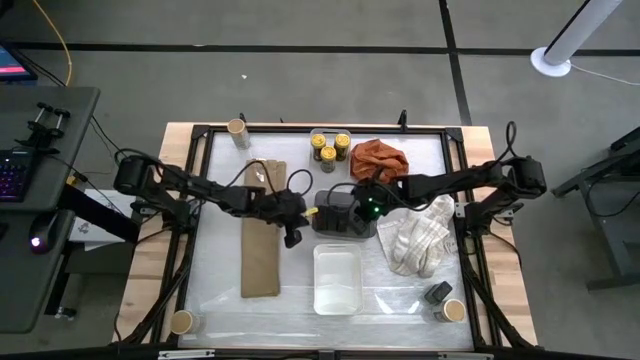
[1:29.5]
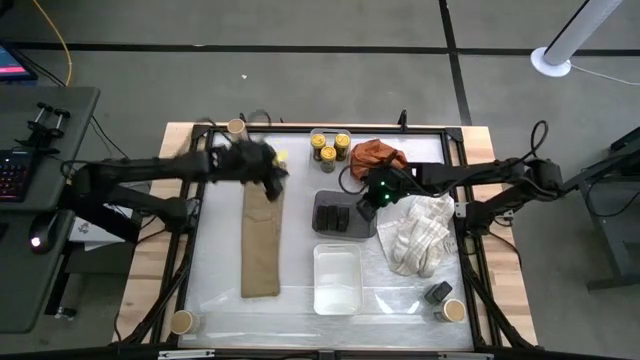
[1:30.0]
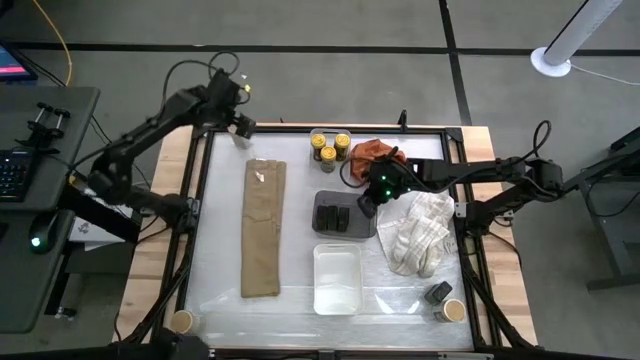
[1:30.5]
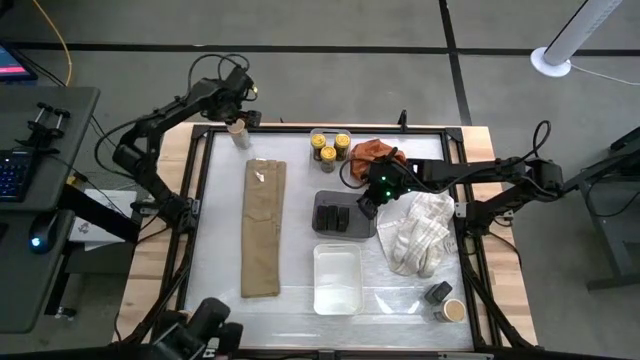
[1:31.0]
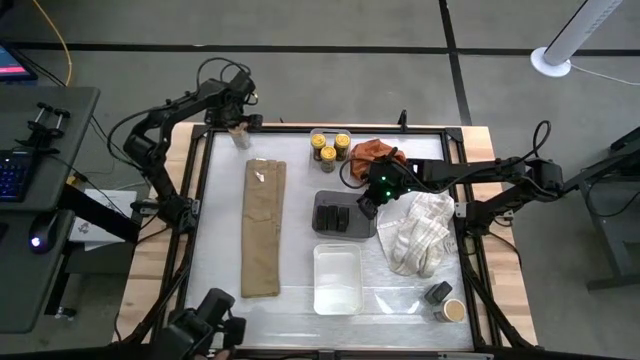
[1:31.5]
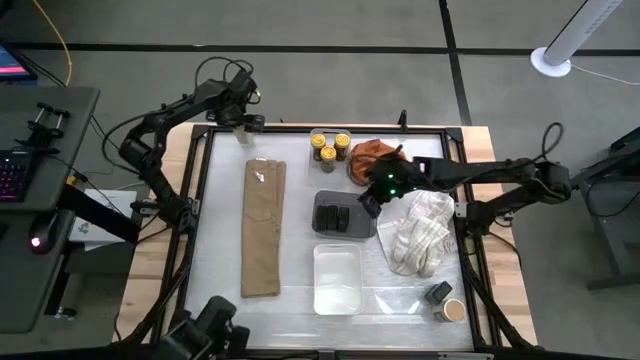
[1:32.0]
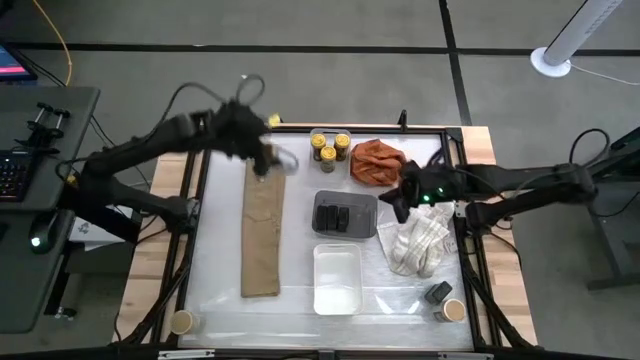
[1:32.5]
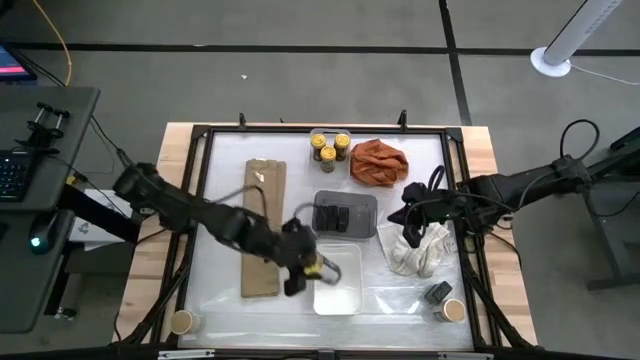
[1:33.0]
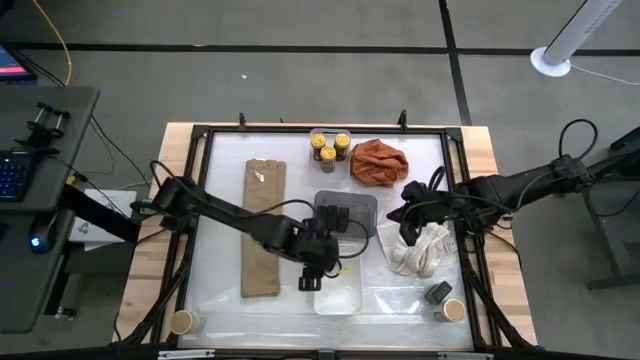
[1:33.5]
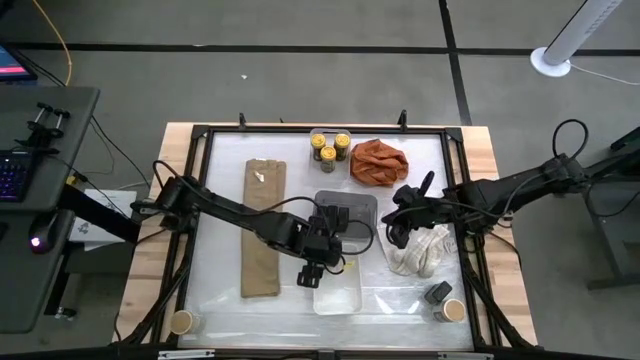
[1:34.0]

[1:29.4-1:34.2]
Task: Sort spices by type
Put the top left gold seasoning bottle into the white bin

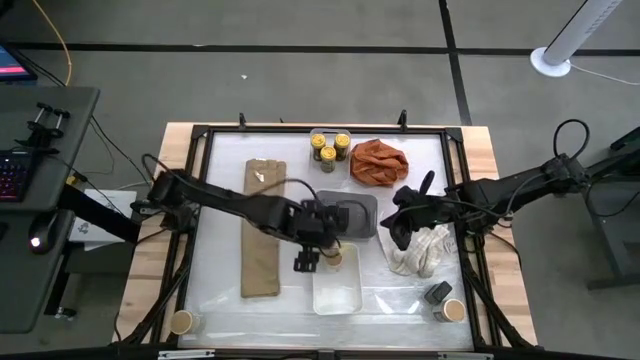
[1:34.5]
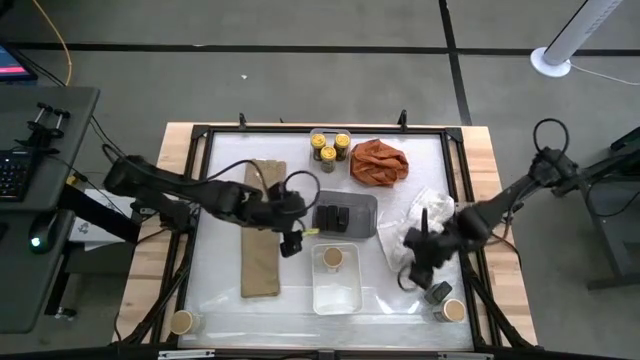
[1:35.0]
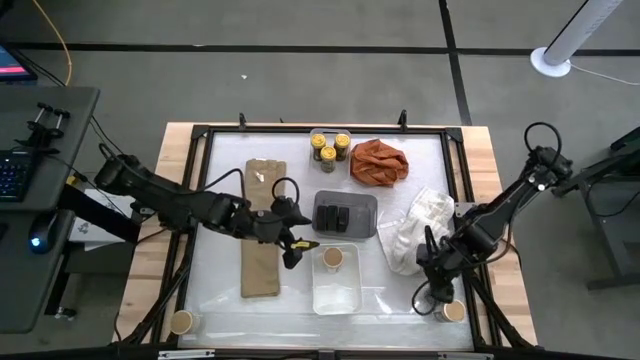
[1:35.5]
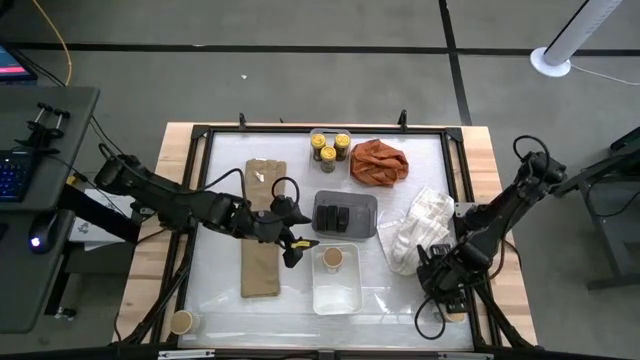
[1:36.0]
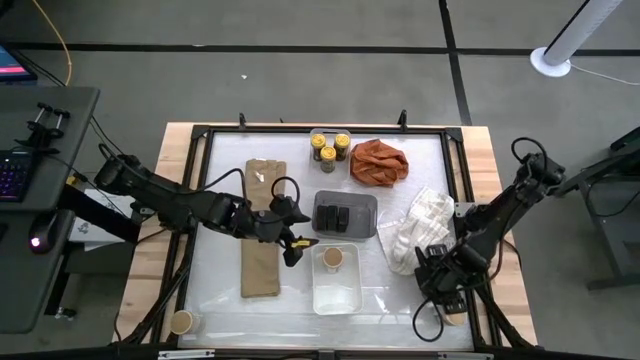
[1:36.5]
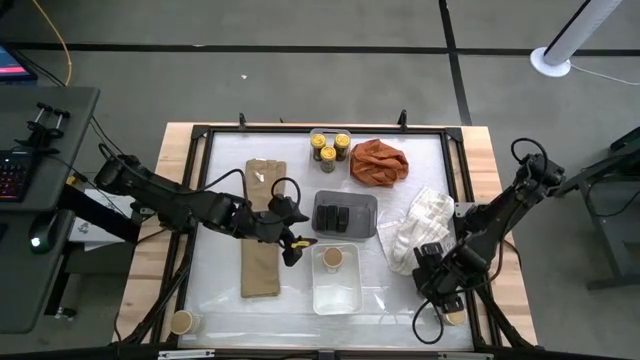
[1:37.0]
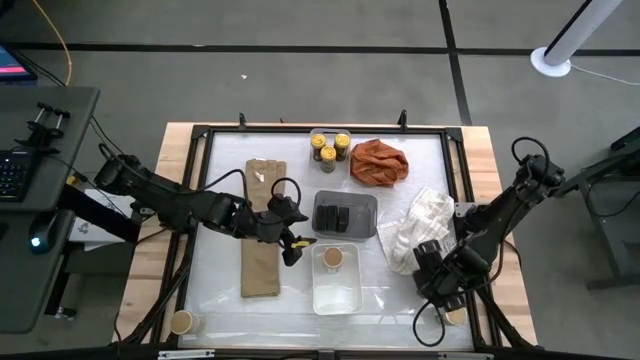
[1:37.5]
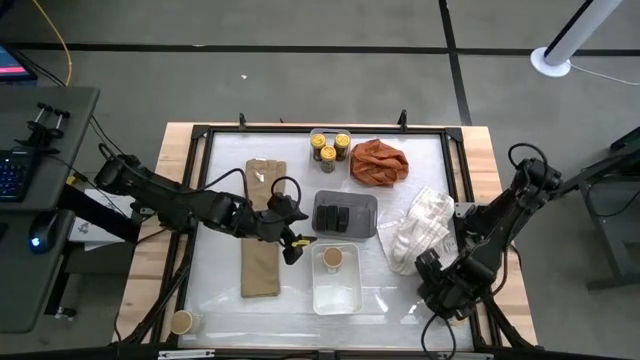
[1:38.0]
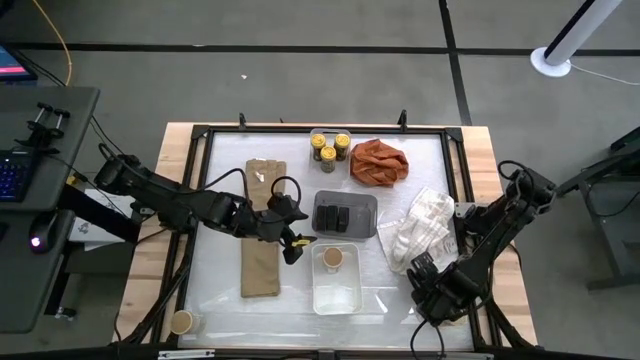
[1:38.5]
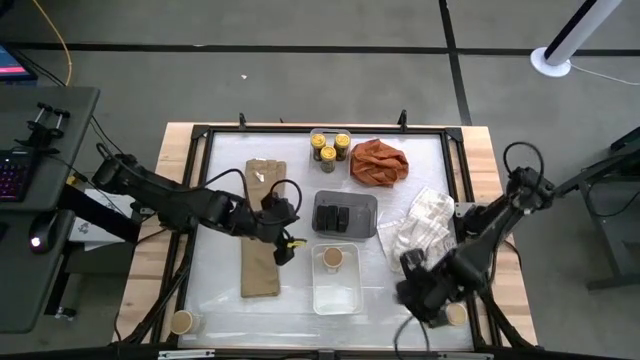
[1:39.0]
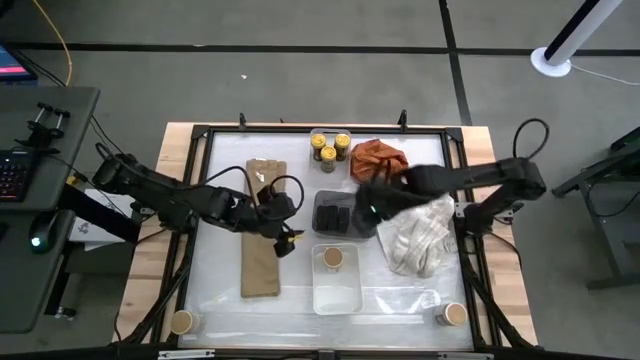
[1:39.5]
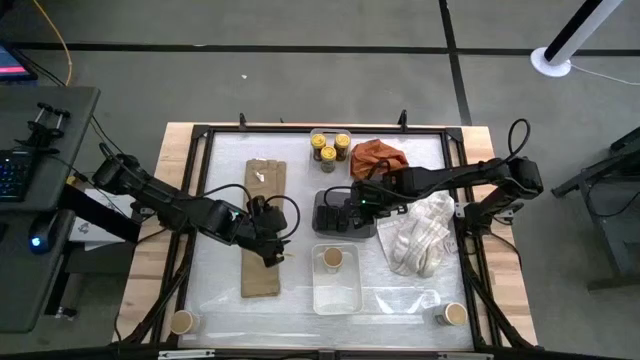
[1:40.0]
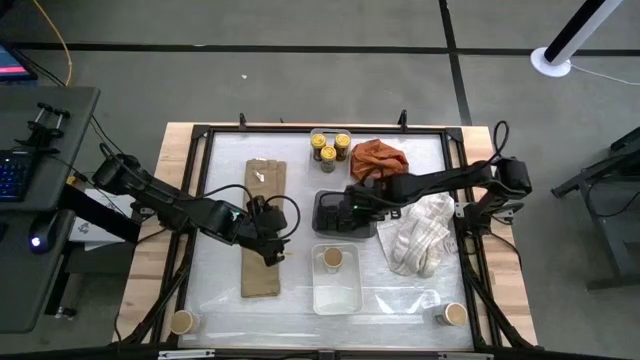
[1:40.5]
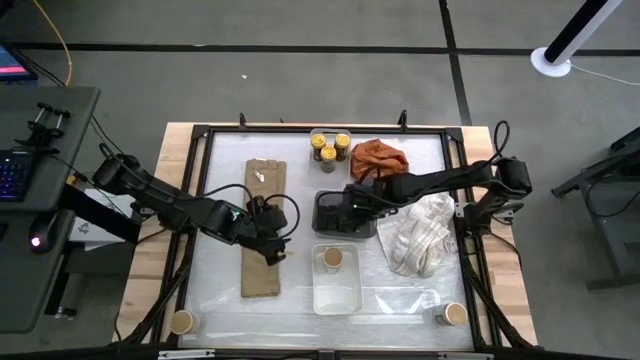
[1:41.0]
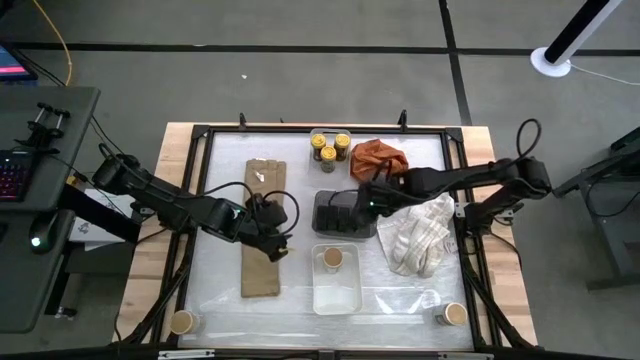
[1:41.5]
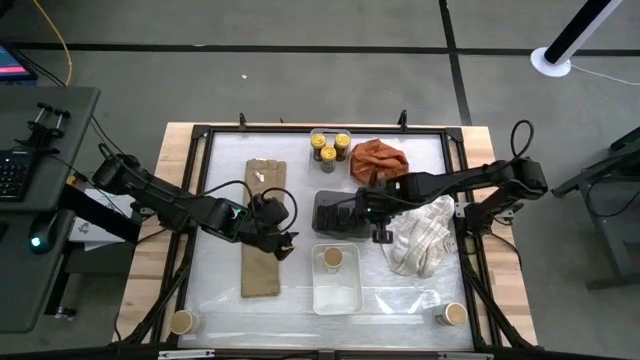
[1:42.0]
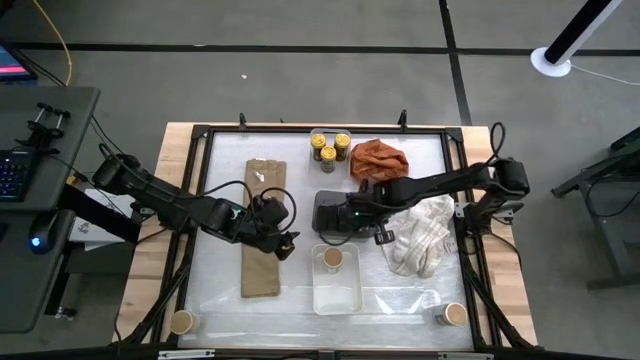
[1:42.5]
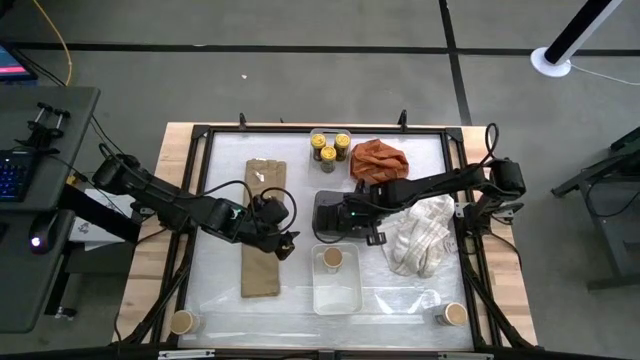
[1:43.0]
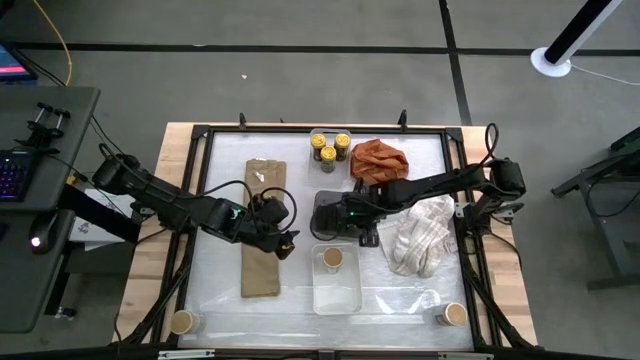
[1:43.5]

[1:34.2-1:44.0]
Put the black seasoning can into the black bin

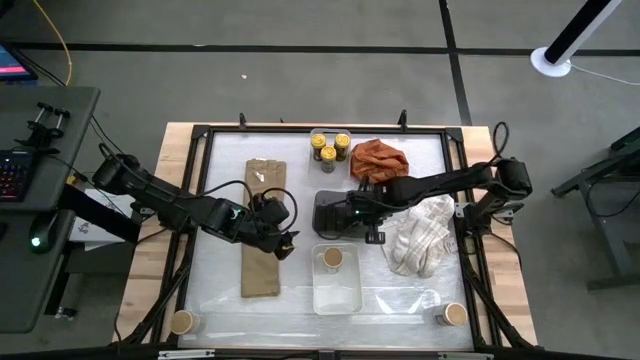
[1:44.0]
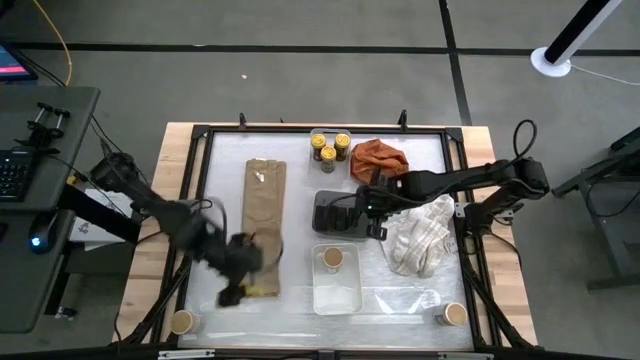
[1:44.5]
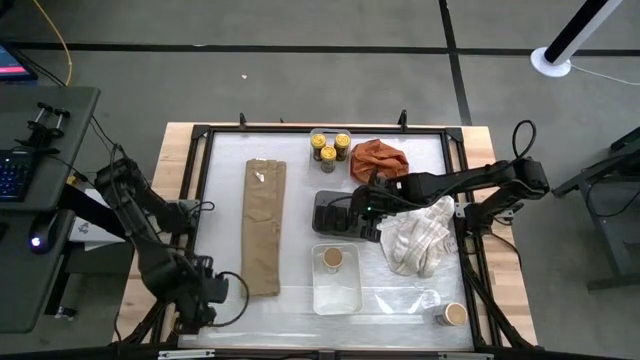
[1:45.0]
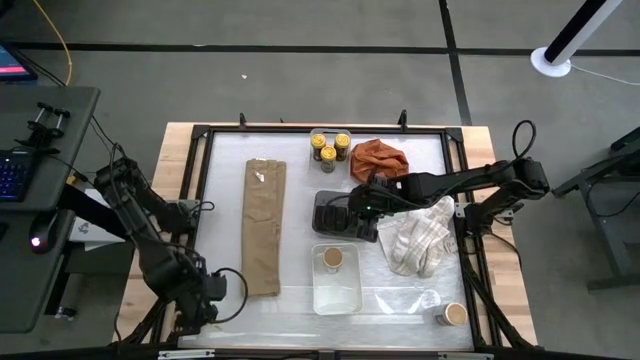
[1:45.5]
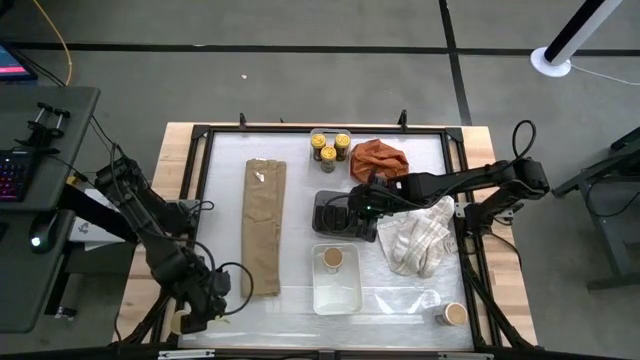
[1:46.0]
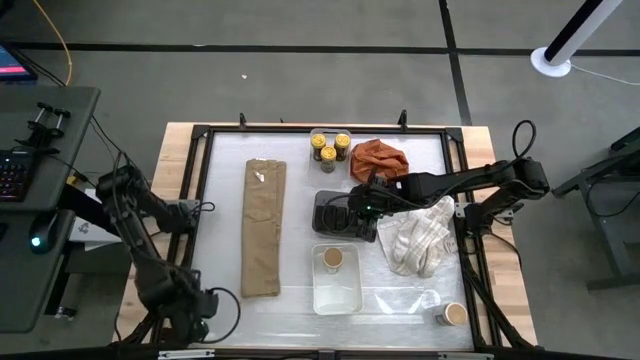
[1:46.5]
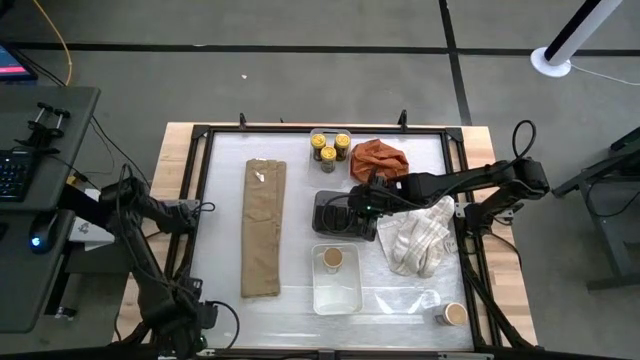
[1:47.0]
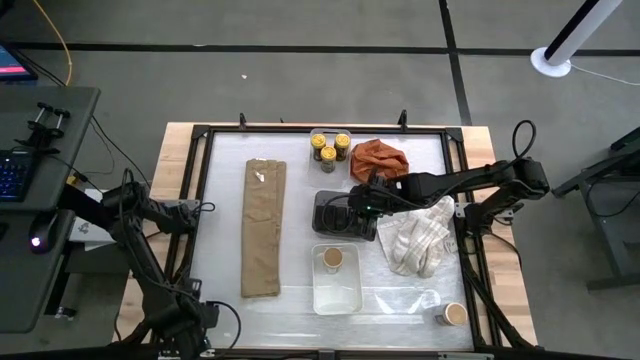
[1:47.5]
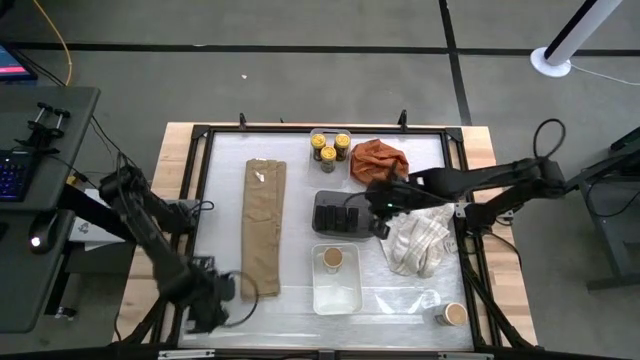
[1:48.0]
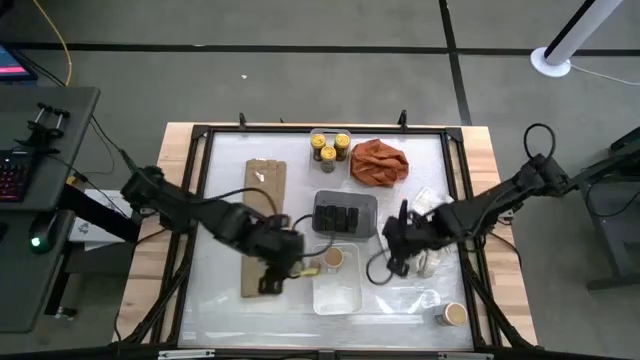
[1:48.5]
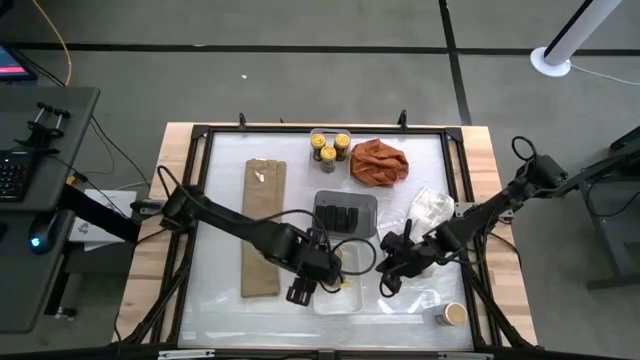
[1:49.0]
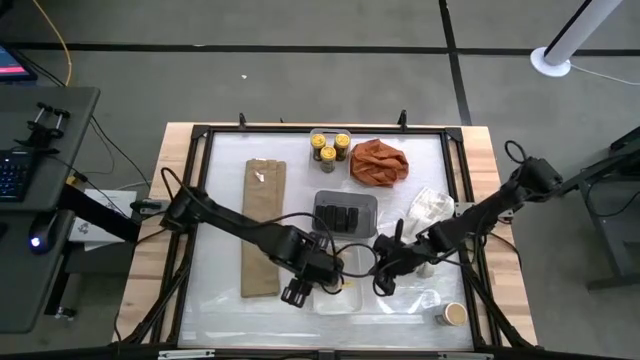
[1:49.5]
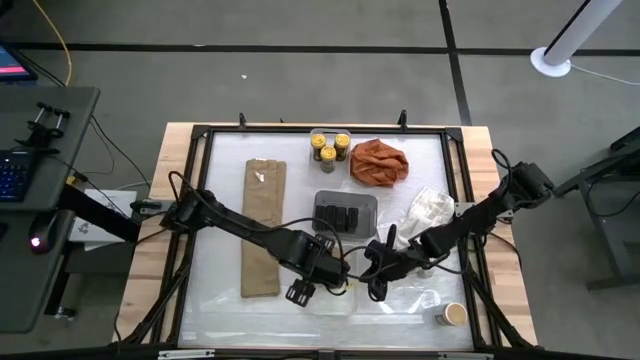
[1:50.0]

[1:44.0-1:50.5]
Put the left gold seasoning bottle into the white bin

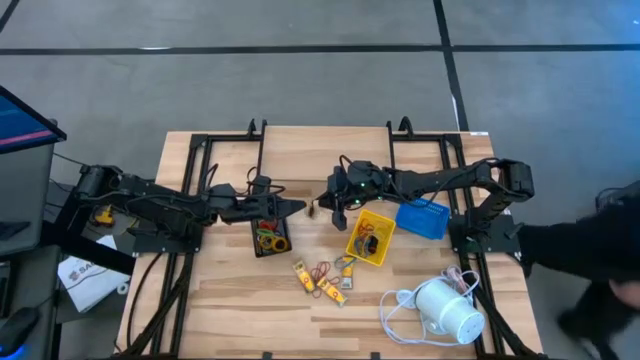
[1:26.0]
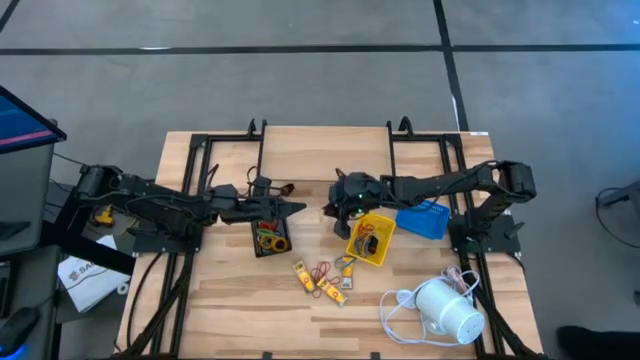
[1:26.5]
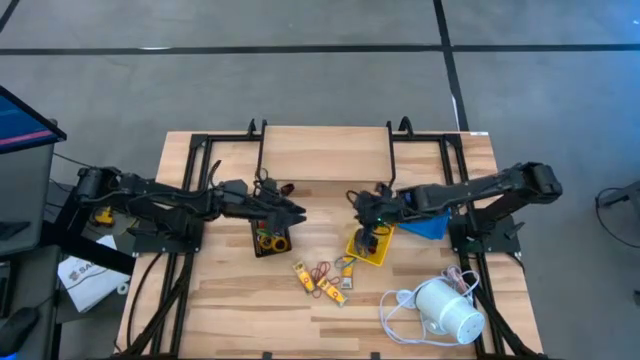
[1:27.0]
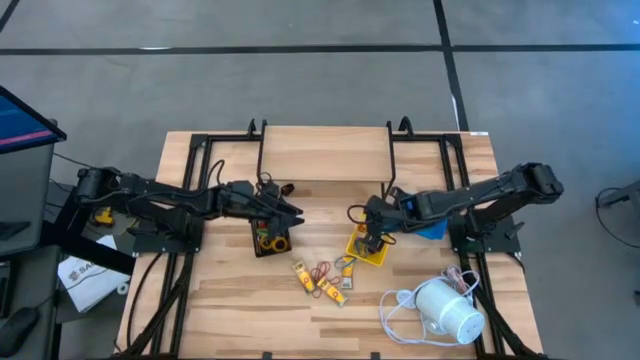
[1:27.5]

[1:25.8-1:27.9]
Task: Pick & Place Office Desk Supplies
Put the light brown rubber band into the yellow bin
